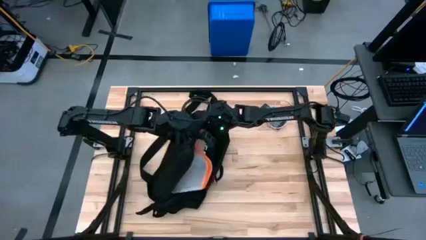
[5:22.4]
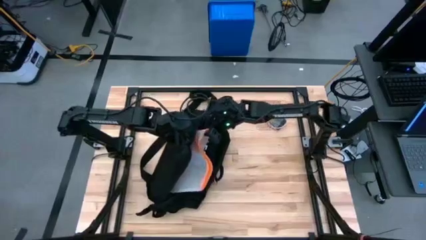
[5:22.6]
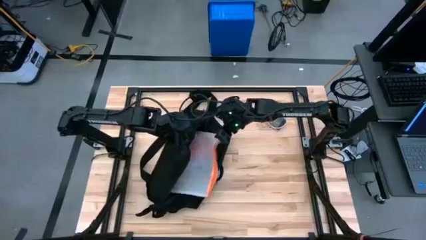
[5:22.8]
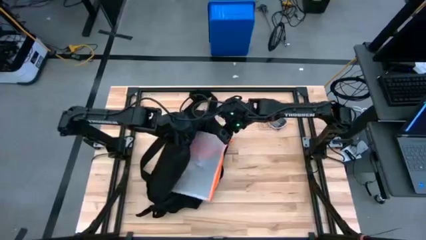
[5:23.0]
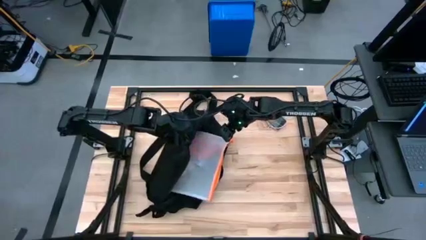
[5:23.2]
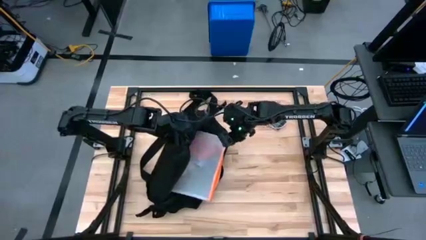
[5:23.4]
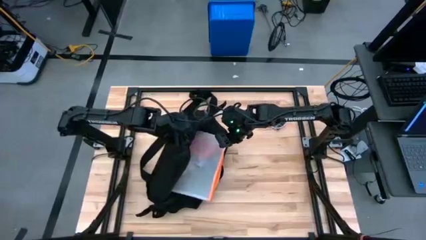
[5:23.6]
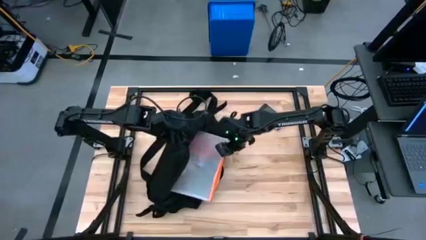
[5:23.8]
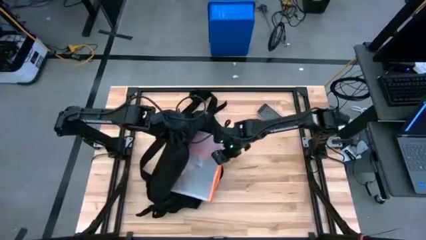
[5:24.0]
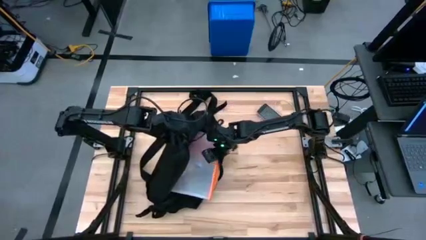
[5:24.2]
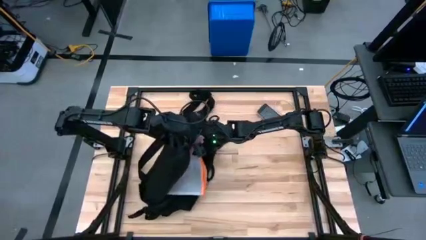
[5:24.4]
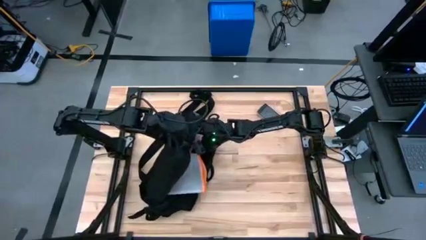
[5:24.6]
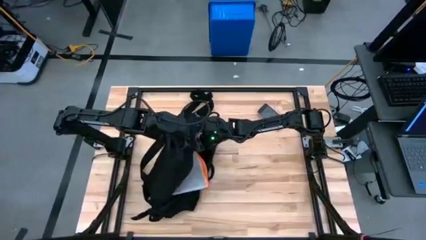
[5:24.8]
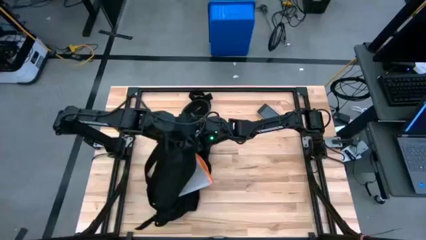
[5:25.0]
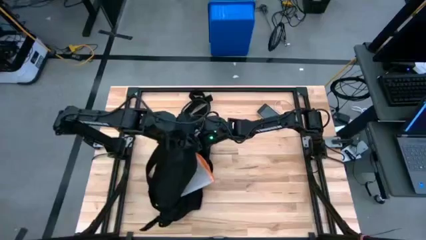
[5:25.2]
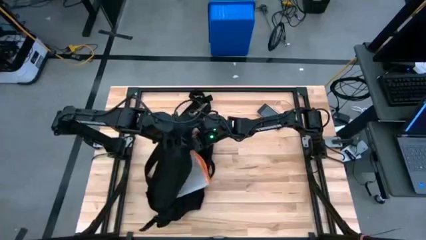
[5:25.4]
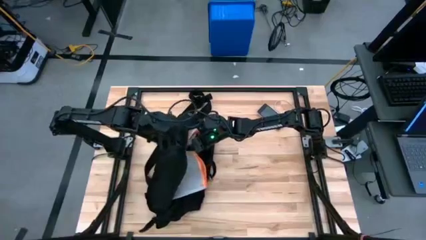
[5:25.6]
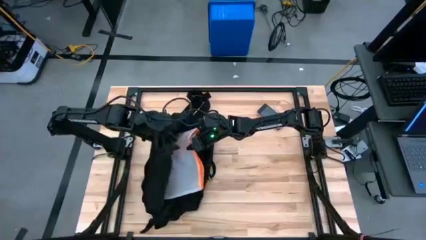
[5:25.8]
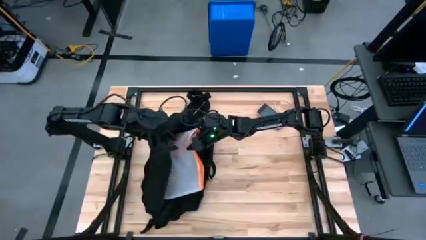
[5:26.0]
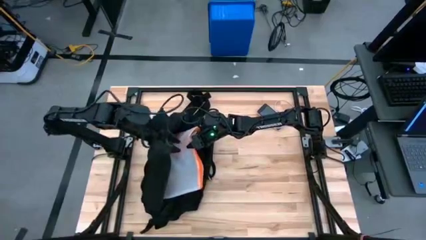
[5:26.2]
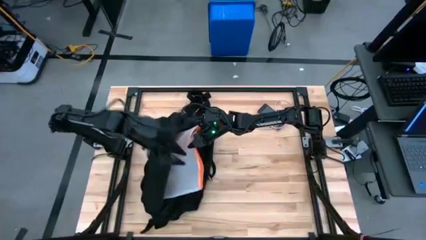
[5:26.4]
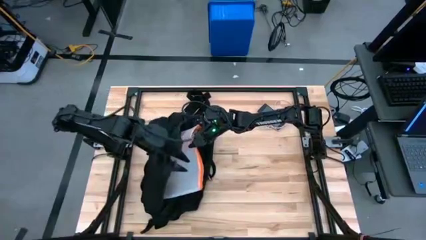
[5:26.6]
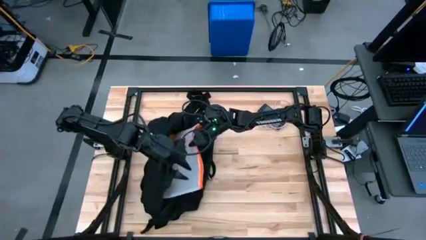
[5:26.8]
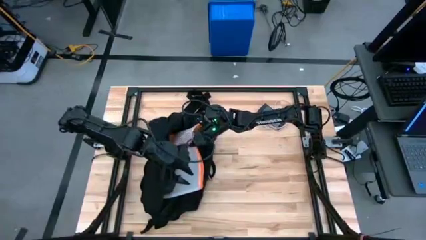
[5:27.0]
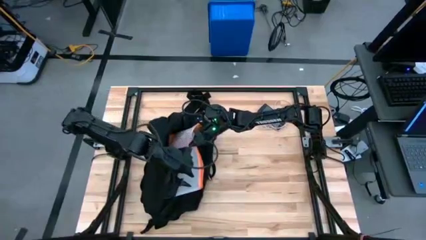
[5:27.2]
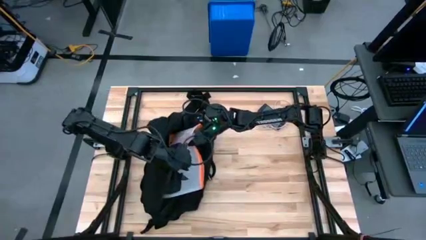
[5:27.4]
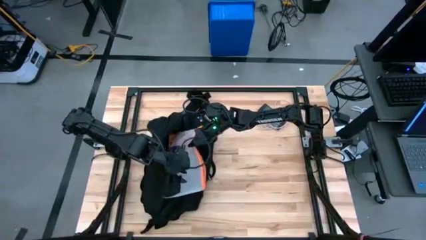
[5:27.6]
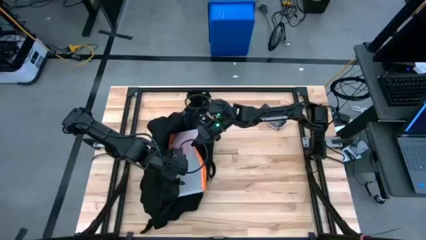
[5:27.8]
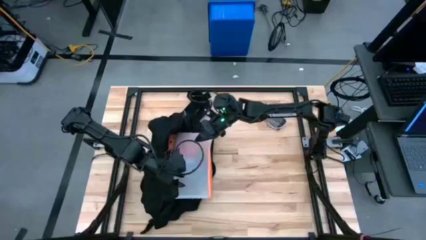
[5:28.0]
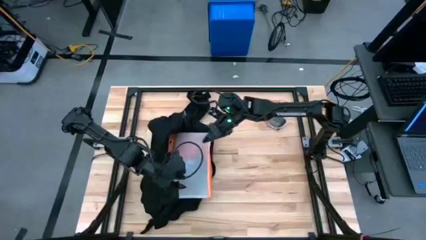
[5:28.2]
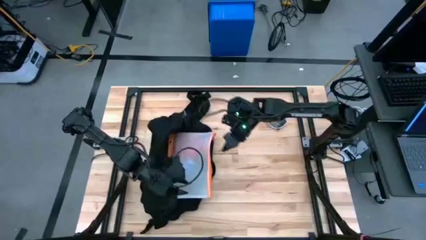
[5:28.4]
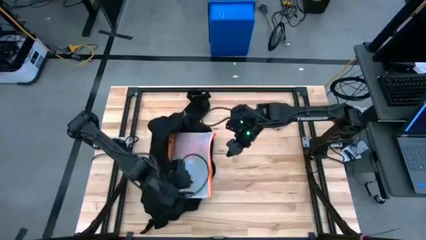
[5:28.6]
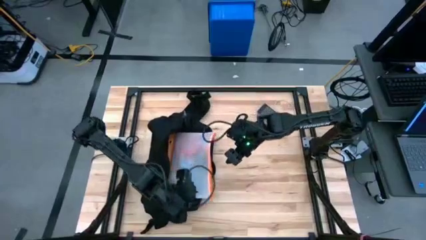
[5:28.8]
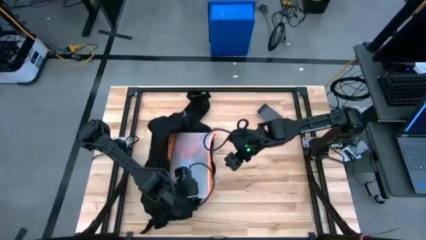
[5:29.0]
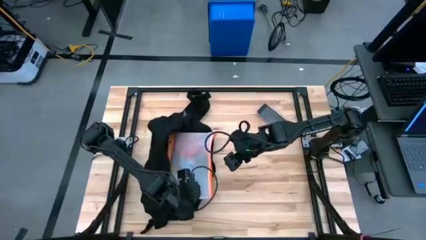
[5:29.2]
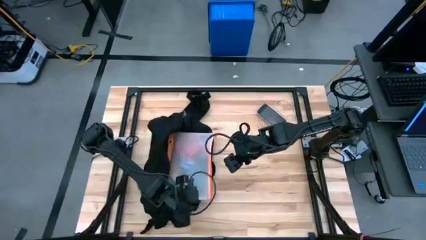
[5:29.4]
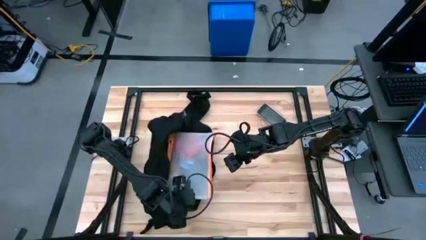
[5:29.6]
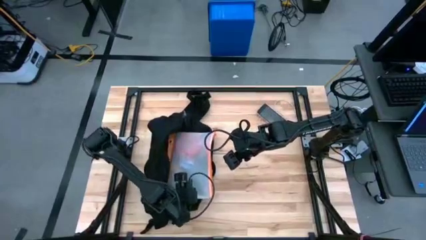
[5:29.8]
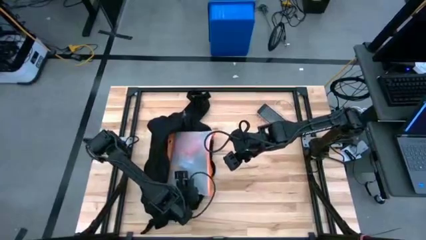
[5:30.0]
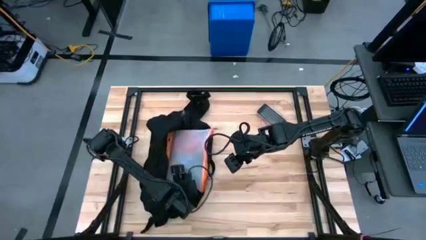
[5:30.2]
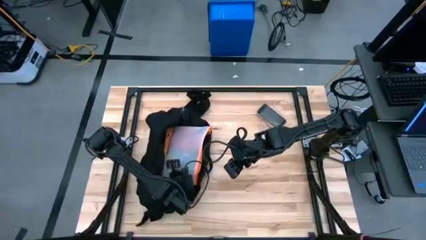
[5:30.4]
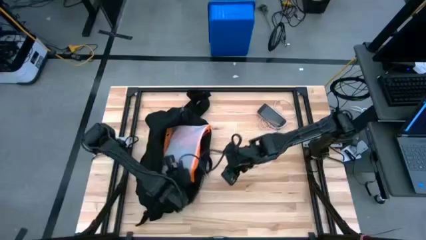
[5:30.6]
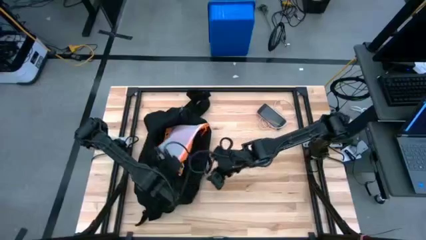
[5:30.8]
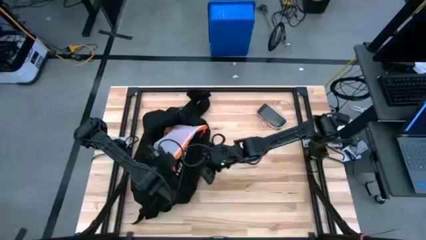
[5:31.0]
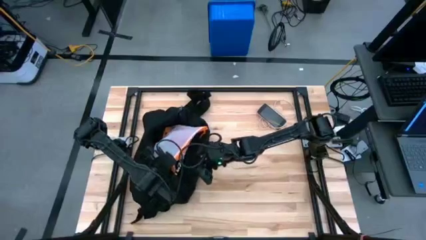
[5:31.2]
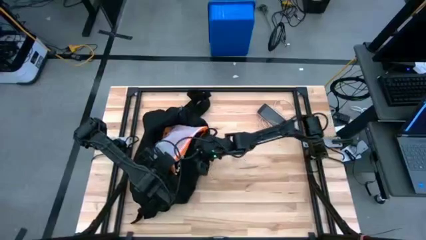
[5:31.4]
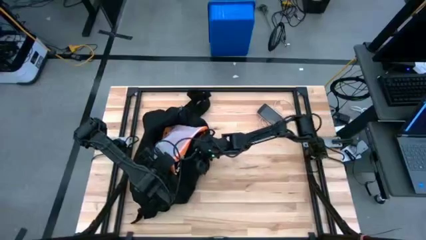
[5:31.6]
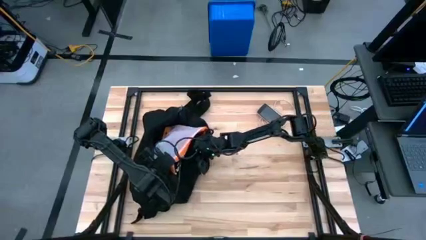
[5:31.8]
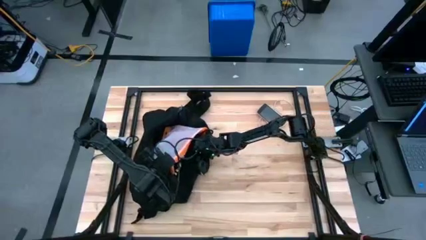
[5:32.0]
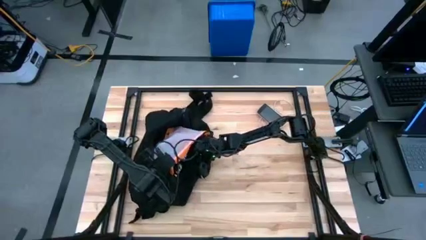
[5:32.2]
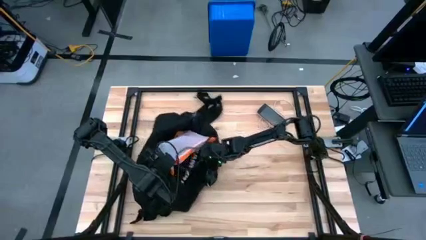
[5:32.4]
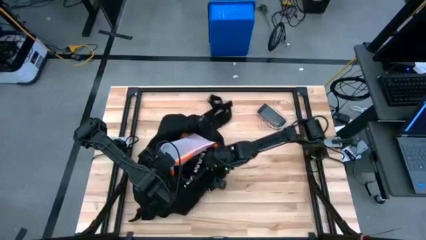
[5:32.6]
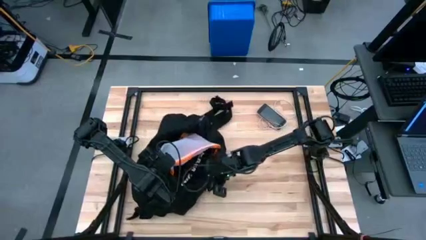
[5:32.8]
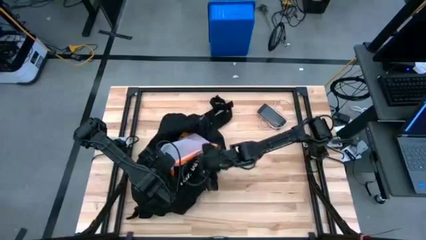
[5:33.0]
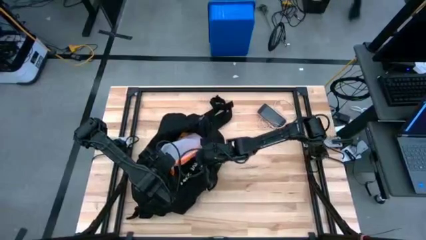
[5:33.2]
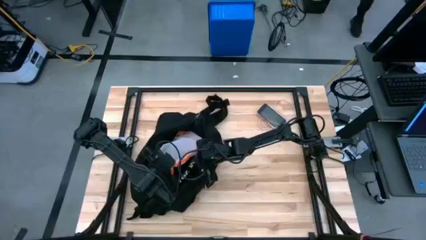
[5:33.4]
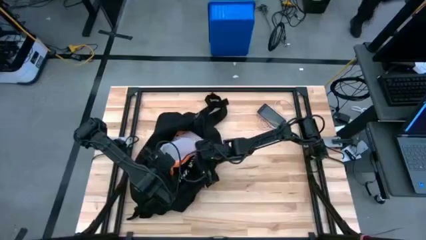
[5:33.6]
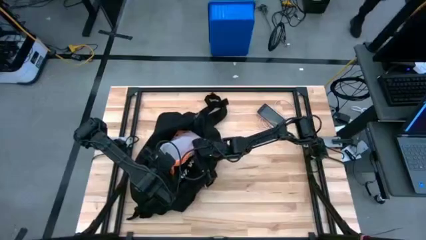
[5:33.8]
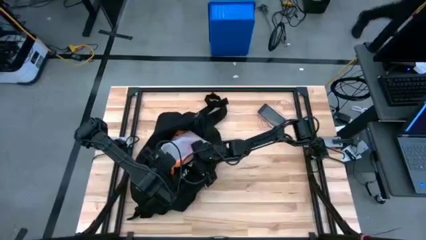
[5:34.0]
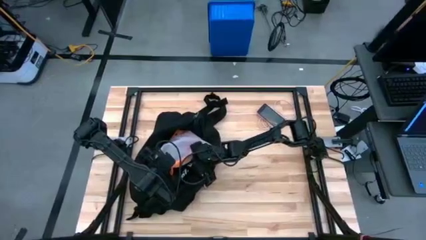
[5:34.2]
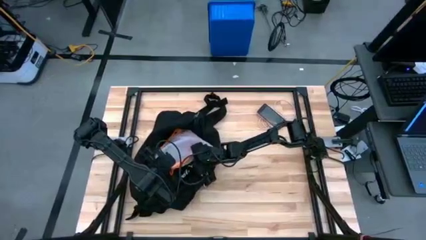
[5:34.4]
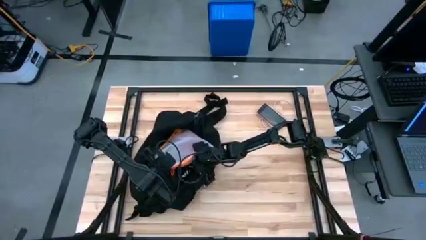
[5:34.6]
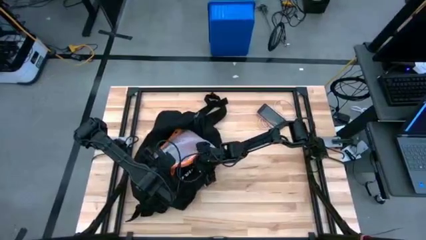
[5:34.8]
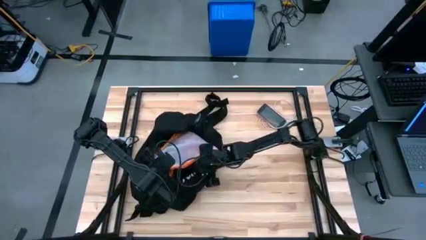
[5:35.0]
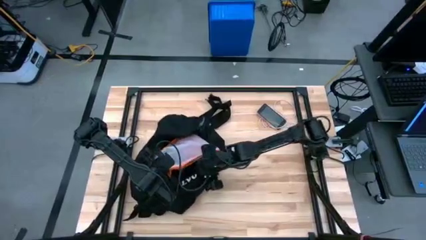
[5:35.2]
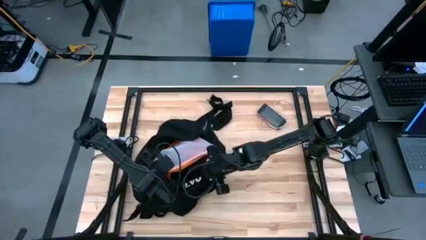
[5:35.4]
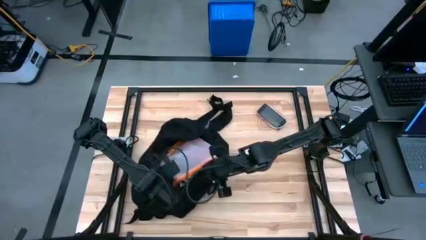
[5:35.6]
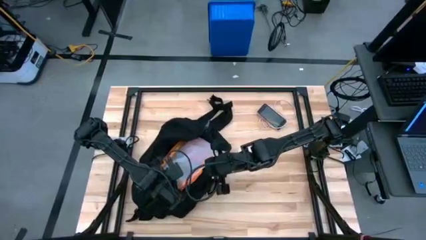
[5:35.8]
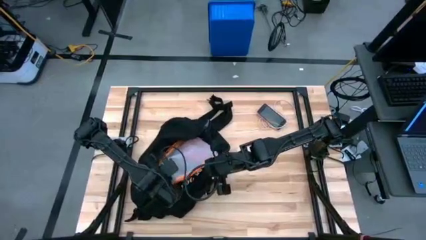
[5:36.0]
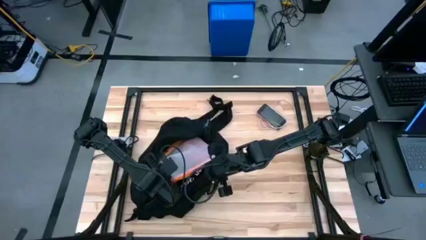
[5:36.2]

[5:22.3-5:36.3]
Task: Unpack backpack
Put the orange zip bag into the black backpack

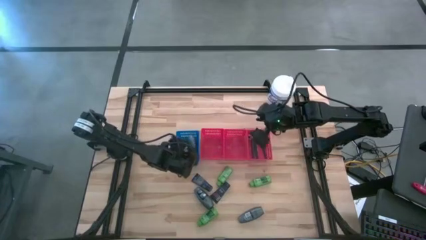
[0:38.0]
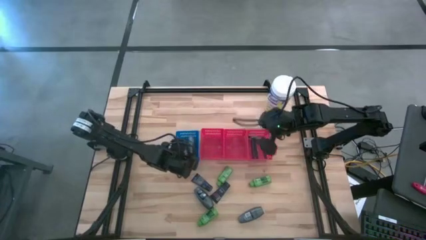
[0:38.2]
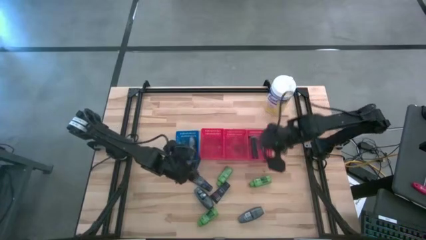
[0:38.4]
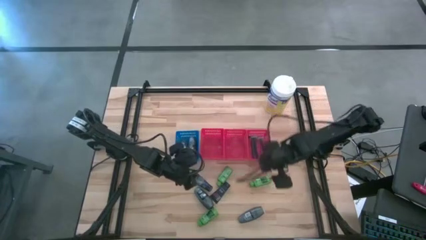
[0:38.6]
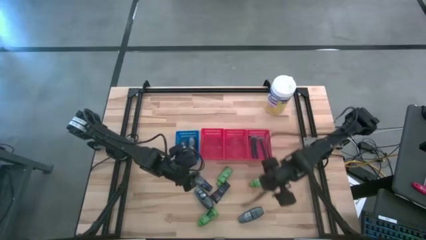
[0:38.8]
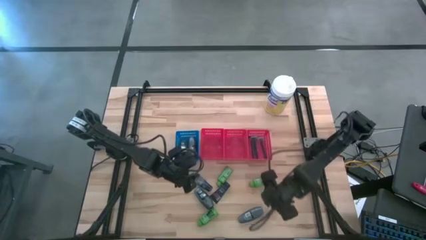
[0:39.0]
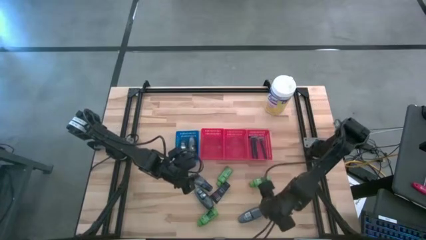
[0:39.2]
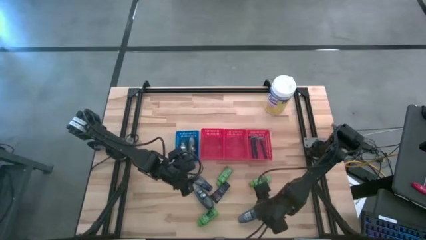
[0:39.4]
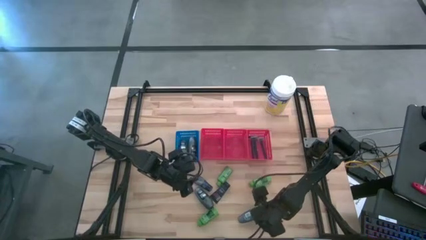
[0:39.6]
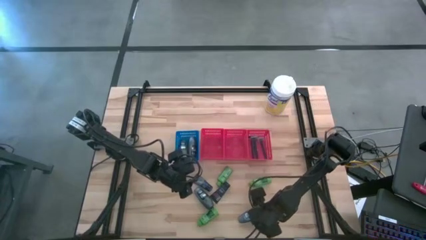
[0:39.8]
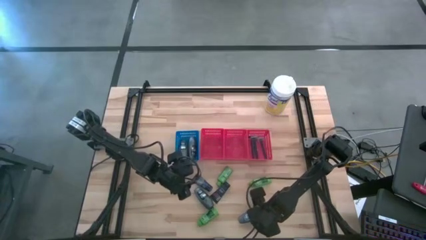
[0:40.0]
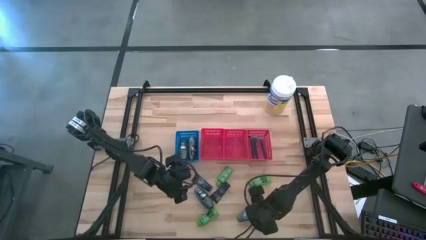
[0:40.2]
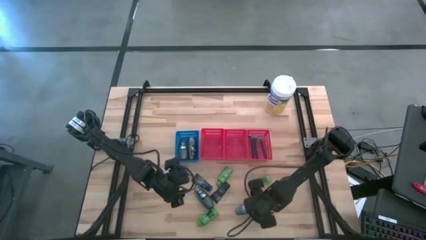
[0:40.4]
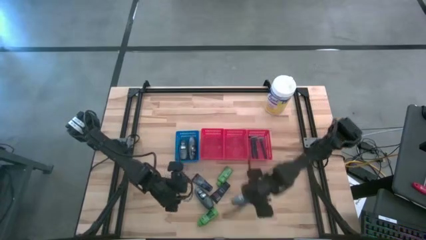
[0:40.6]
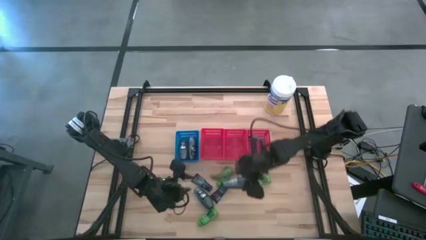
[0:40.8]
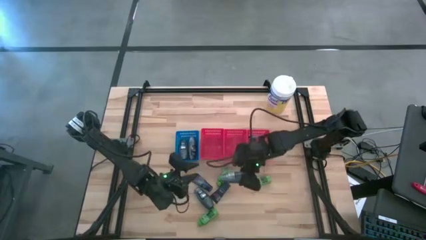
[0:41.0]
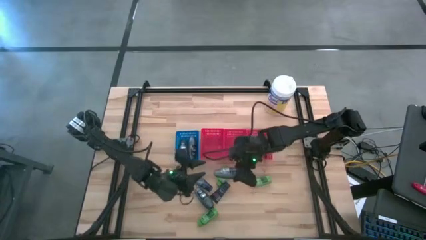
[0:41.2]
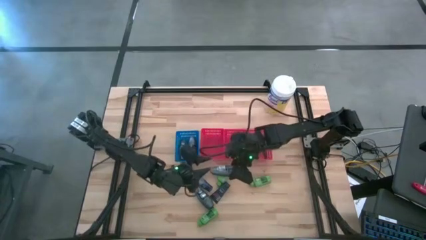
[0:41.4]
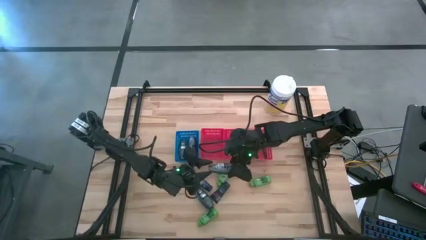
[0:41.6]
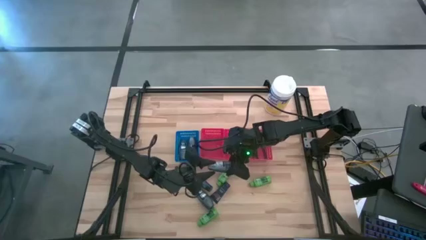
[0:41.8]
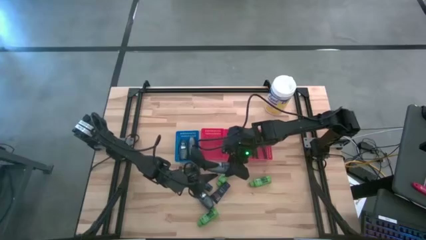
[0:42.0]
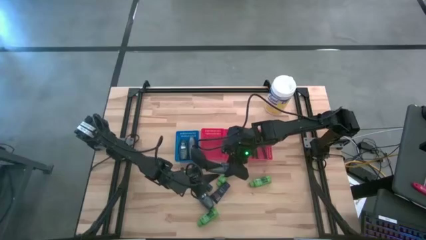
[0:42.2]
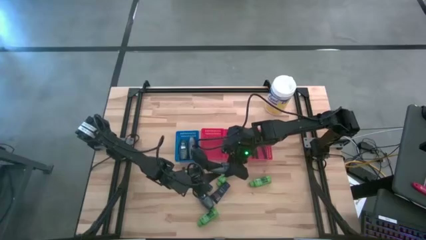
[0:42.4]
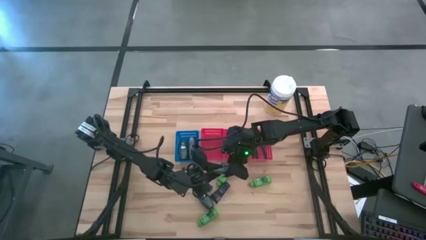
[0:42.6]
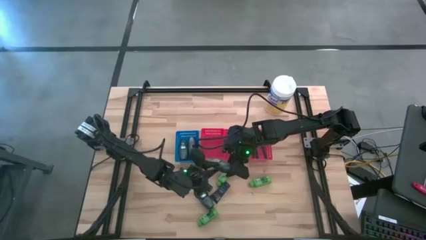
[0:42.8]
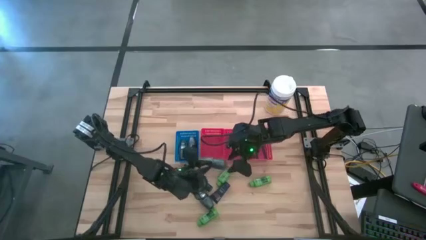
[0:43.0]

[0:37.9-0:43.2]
Task: Pick & Place Travel size toiletries
Put the gray deodorant into the blue bin
